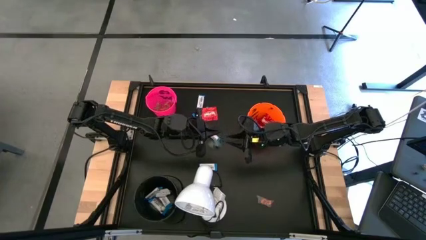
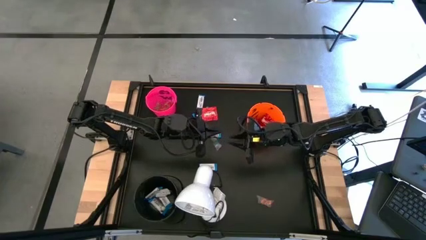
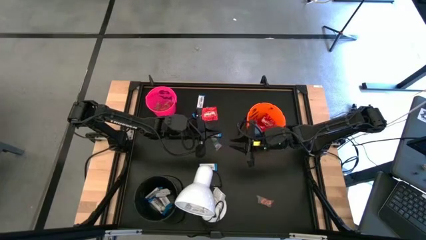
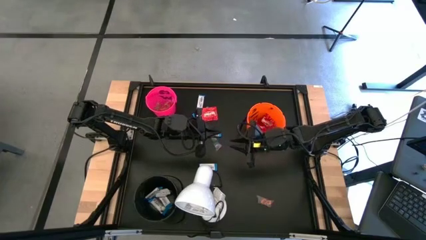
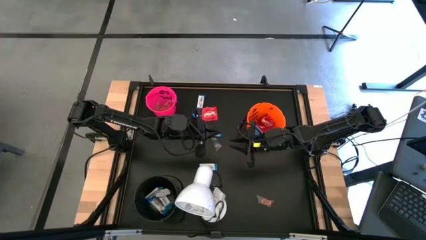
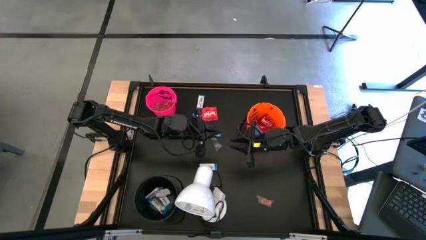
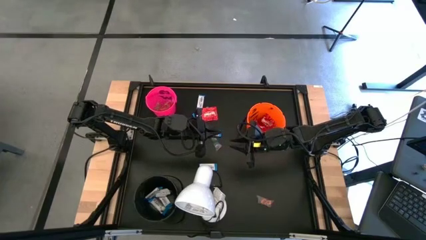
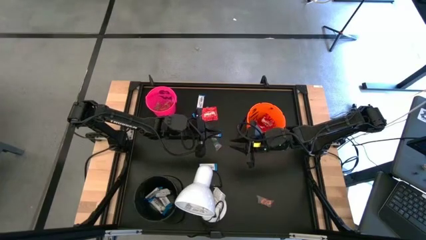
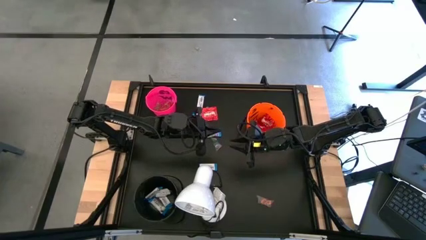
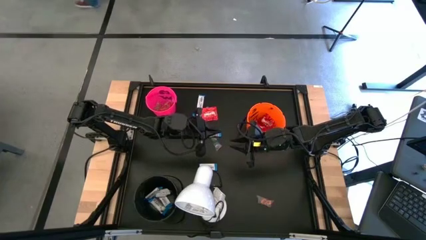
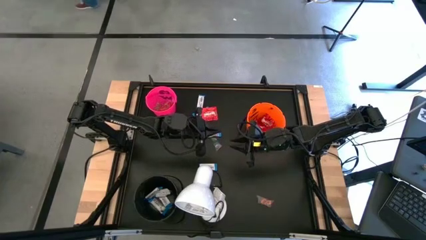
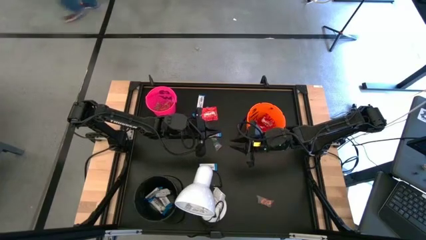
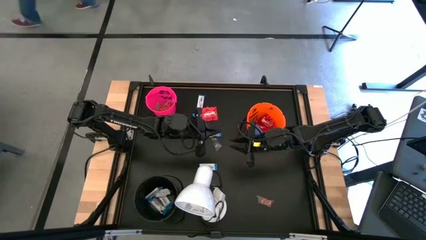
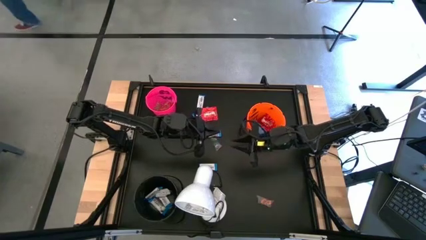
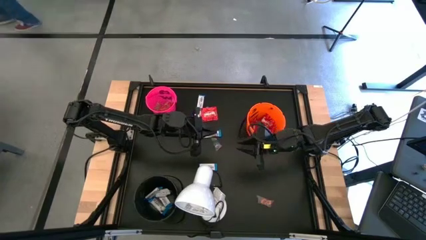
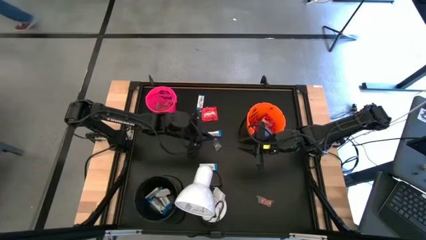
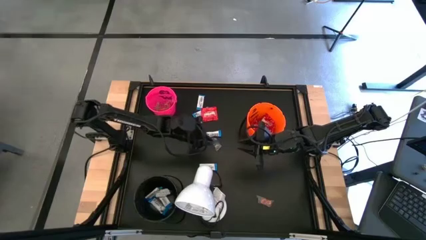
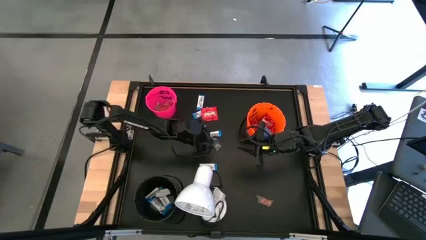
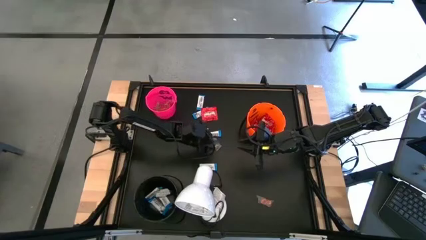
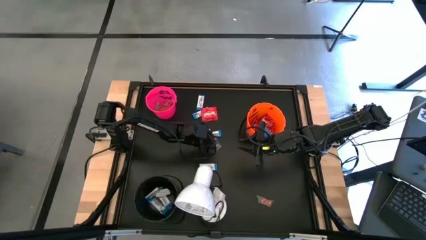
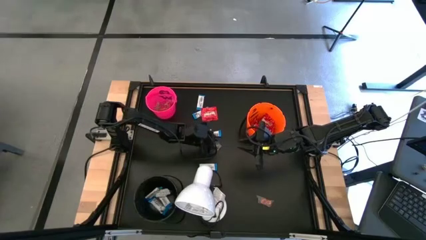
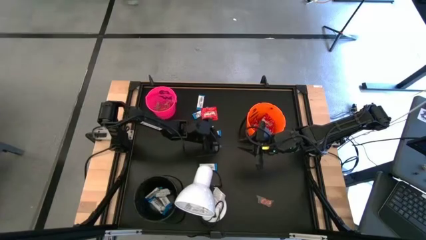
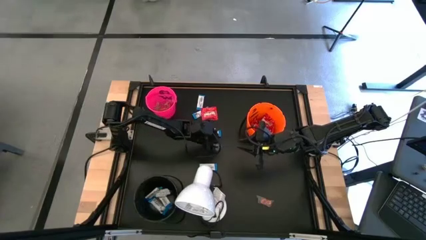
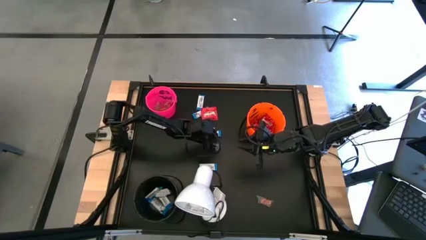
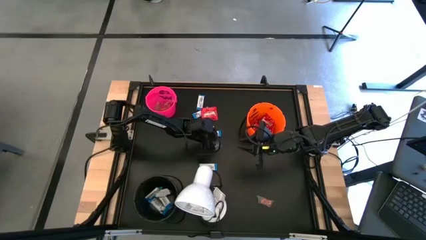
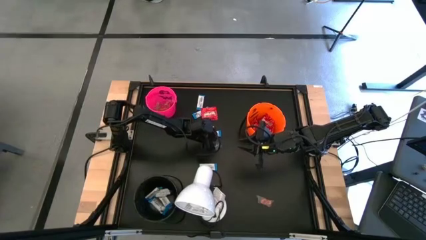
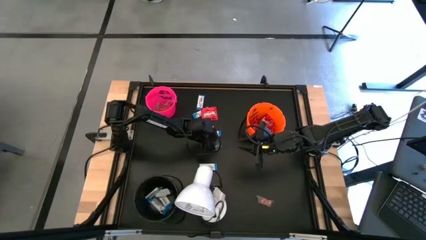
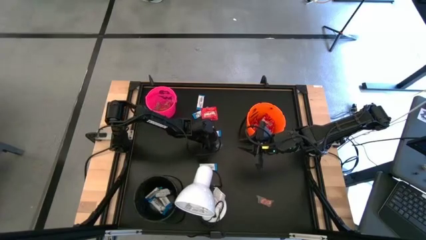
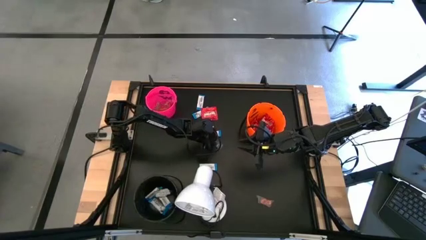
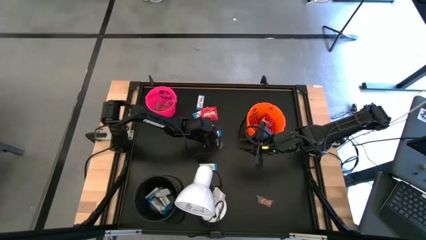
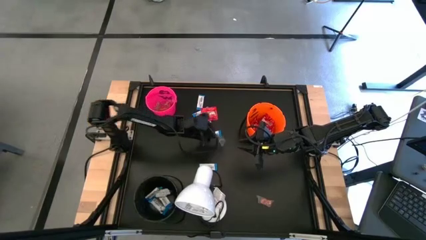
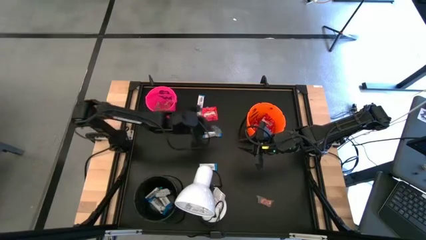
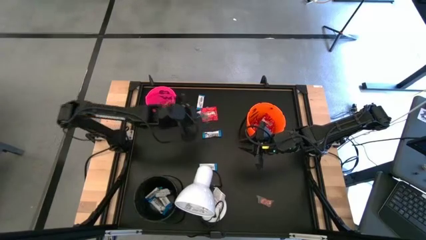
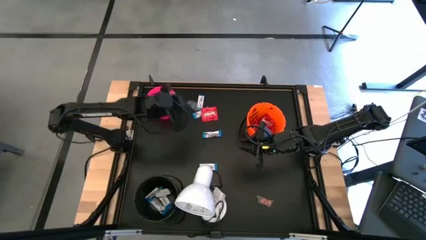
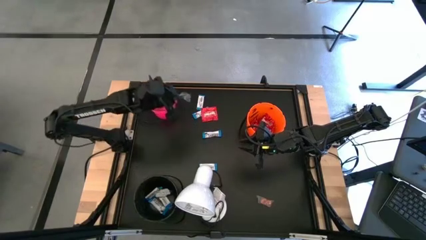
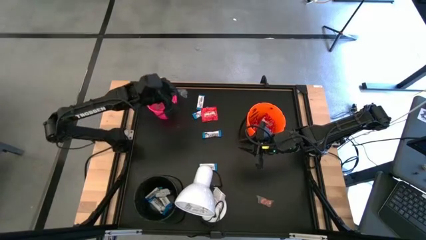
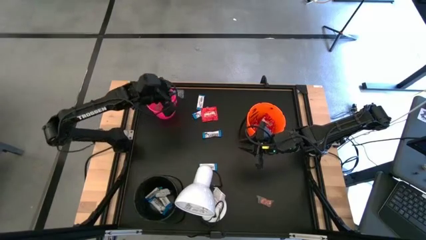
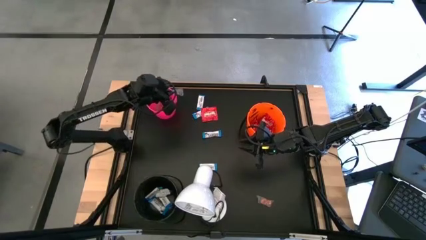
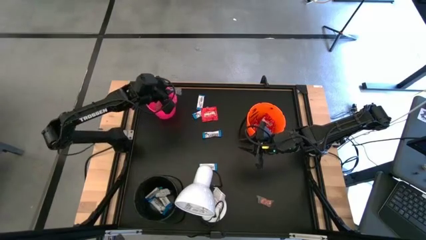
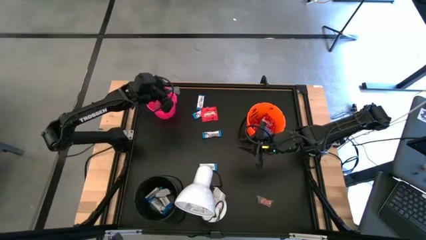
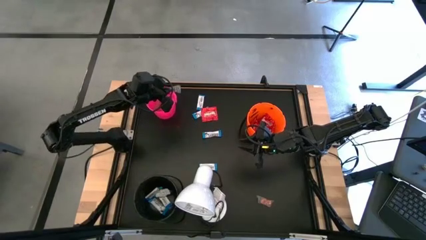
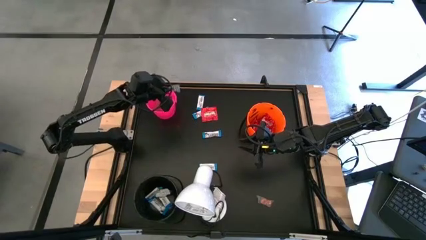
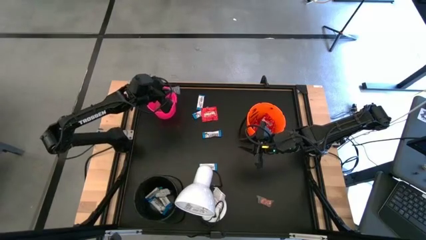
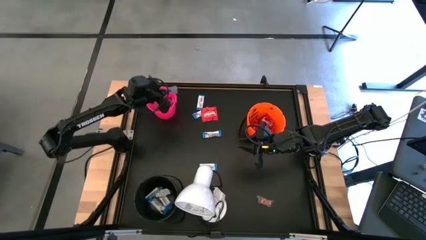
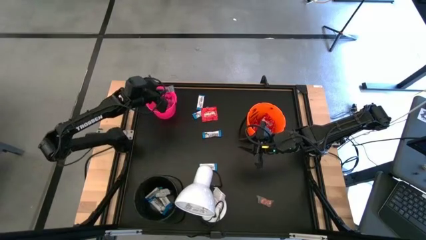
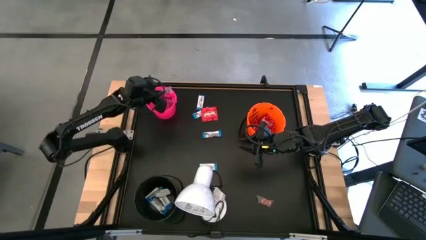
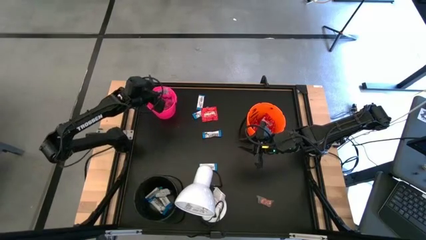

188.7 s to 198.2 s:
Task: Sort candy
Put the green gummy into the pink bucket

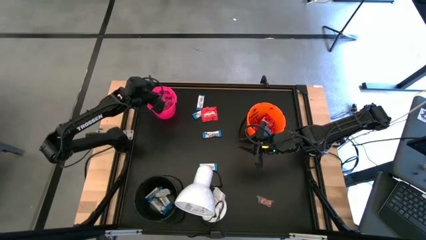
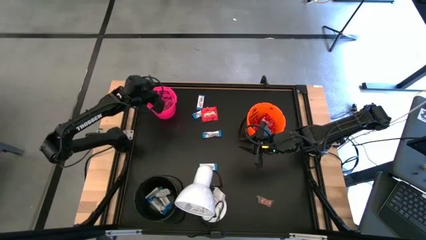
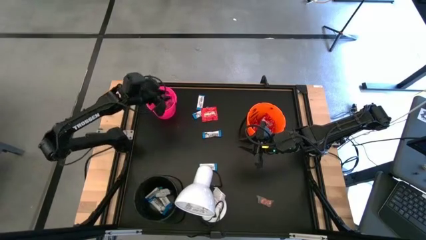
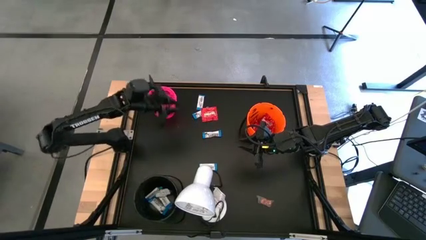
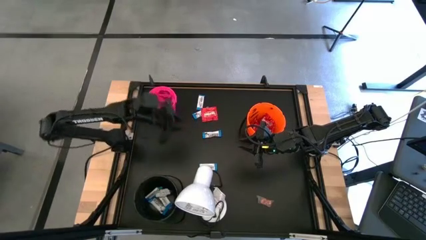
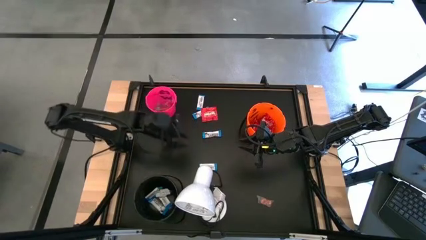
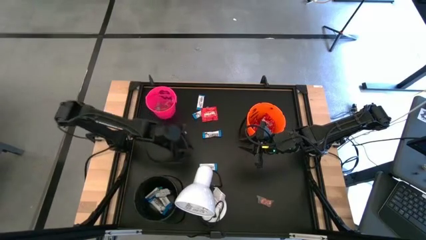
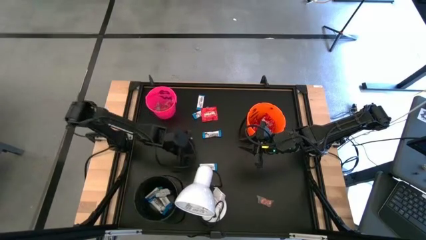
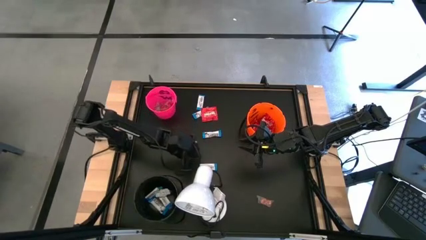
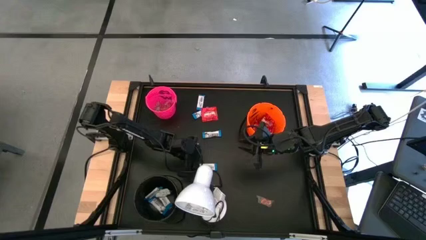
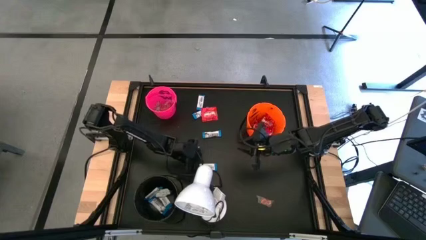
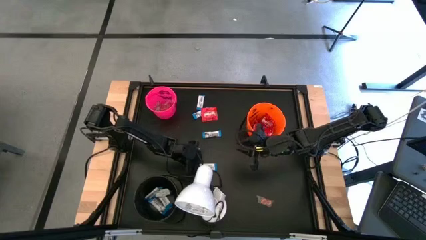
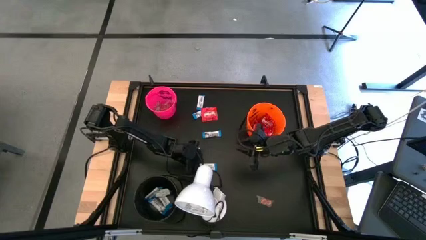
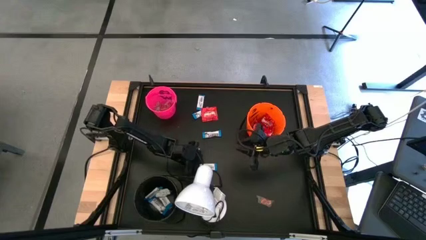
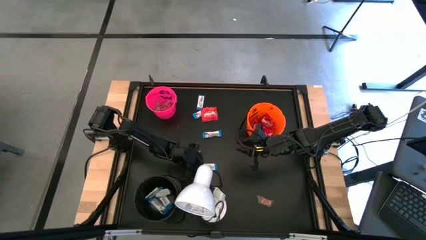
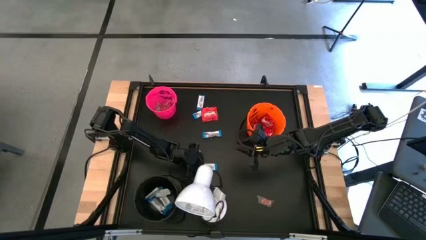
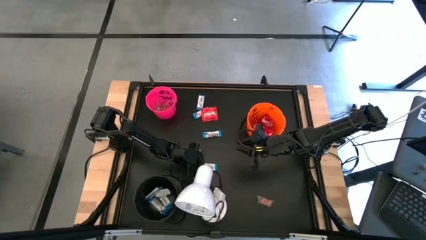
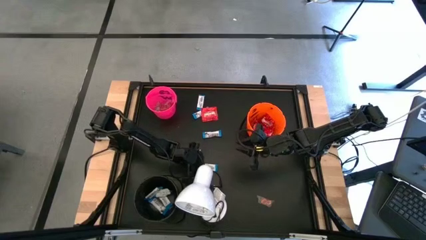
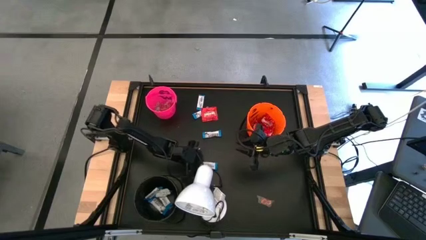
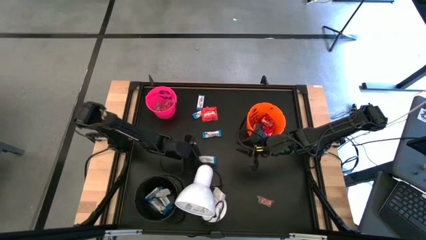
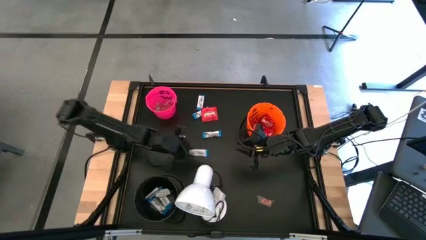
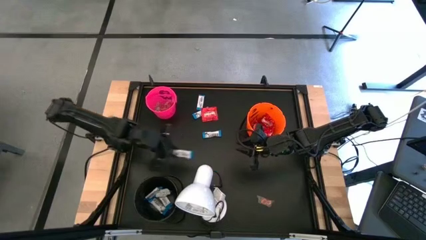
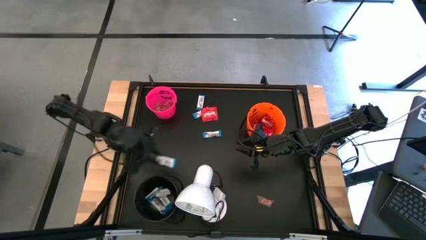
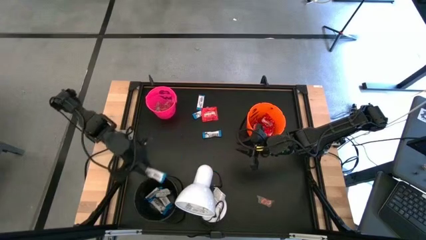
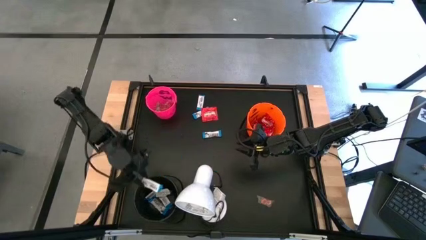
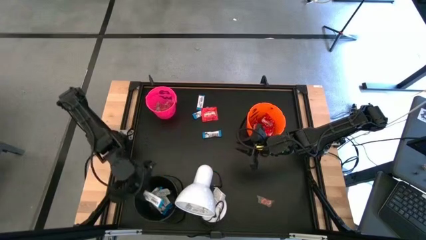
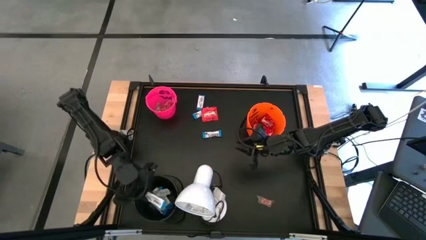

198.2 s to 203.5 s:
Put the white chocolate into the black bucket
